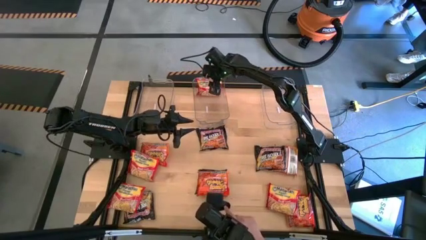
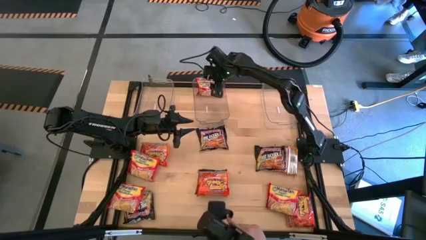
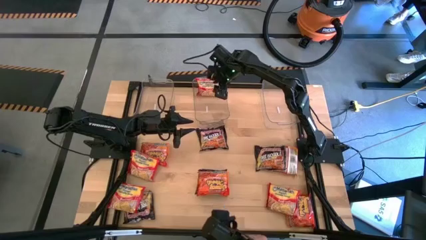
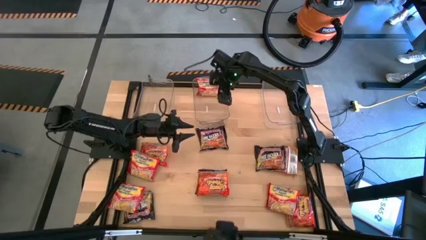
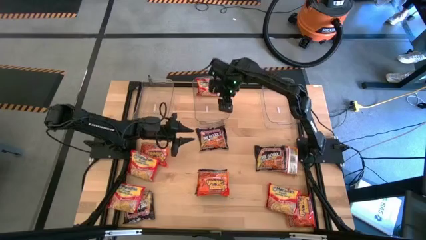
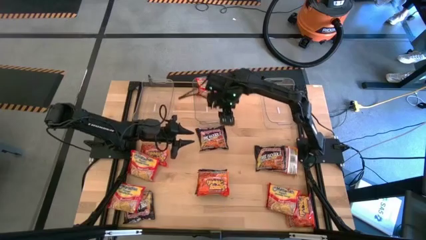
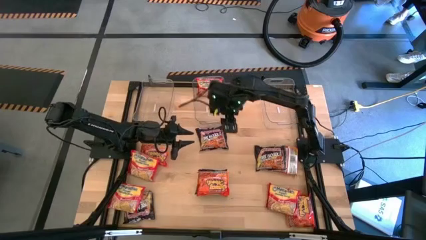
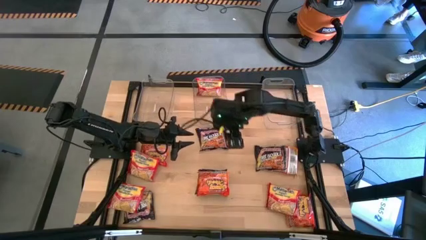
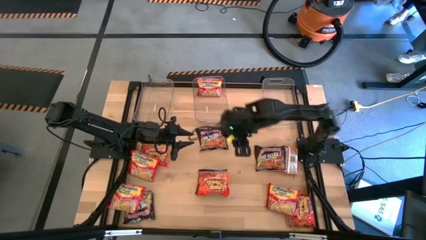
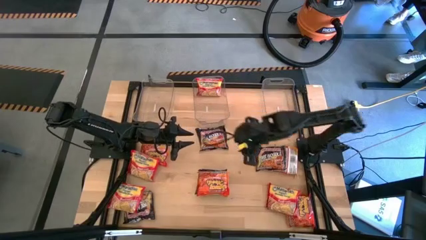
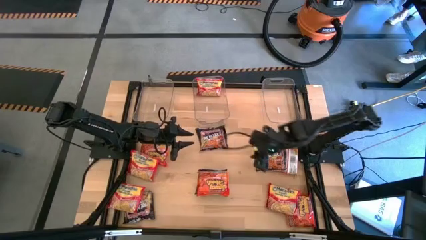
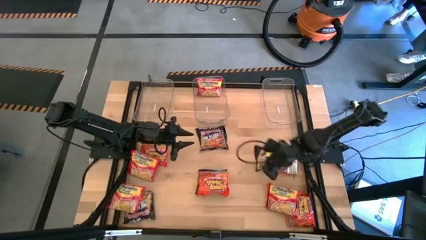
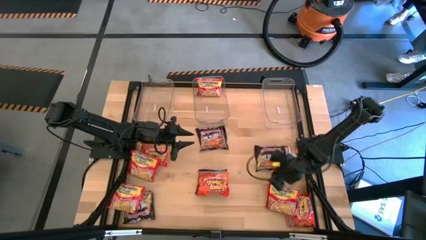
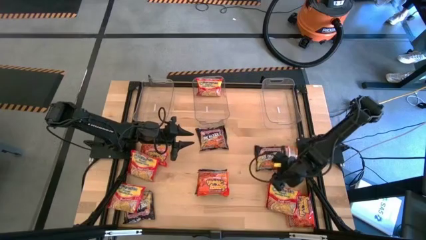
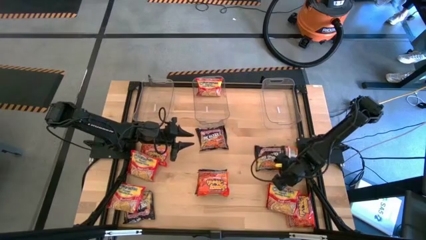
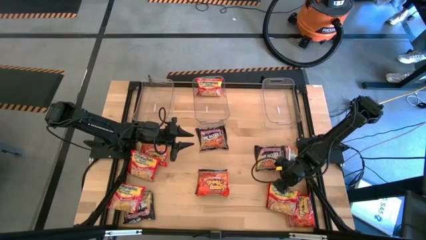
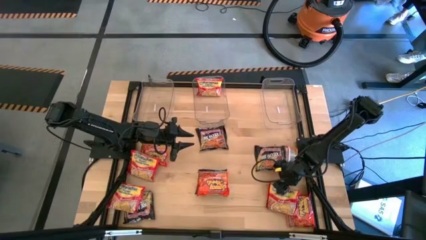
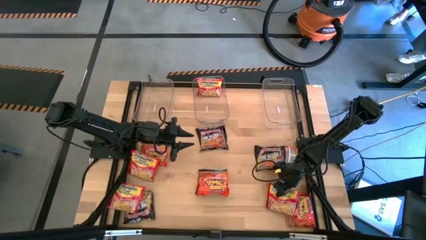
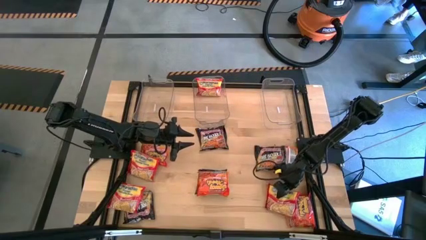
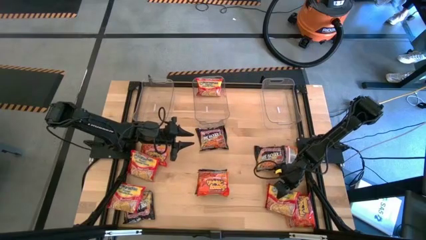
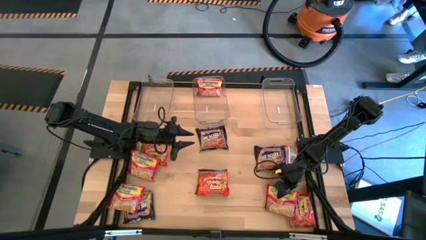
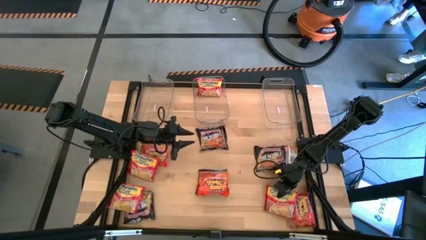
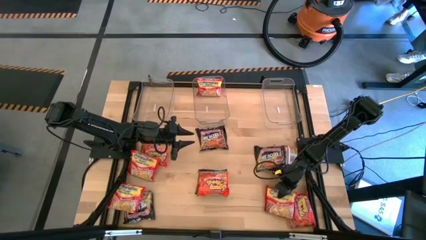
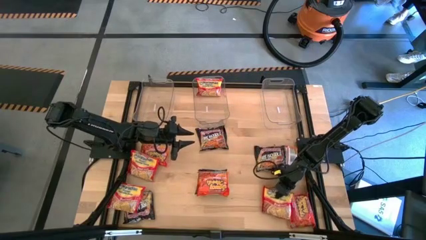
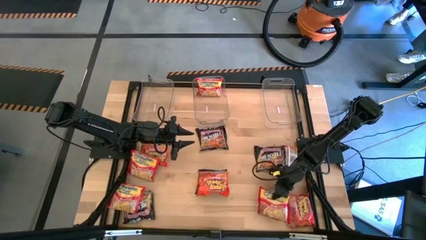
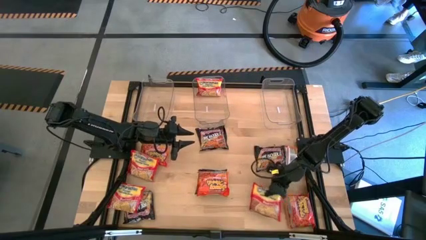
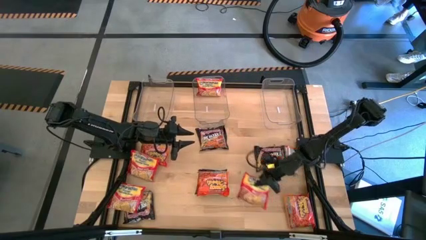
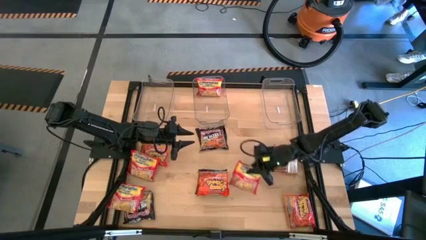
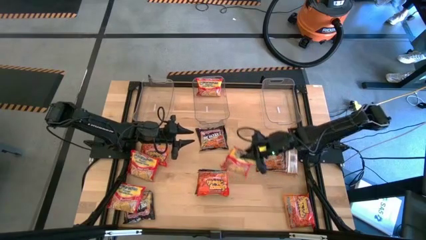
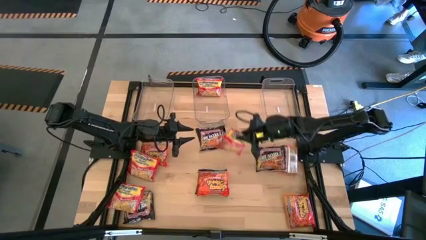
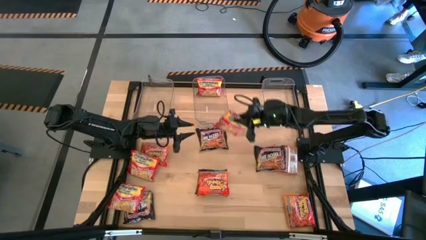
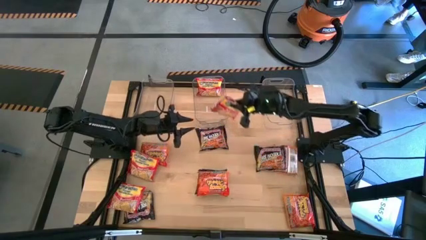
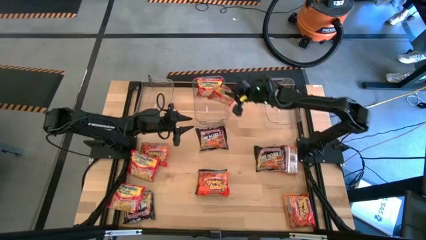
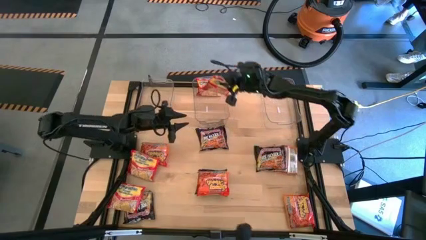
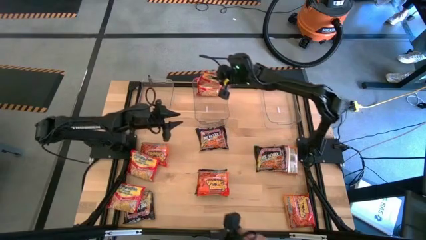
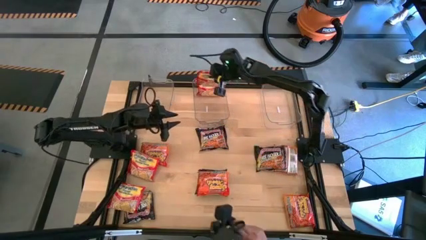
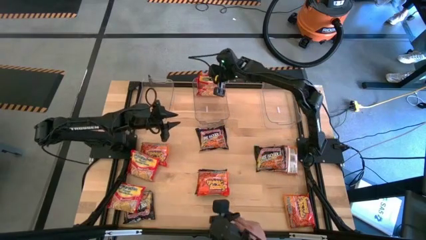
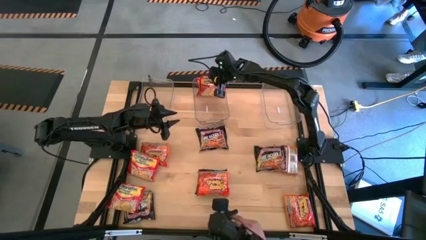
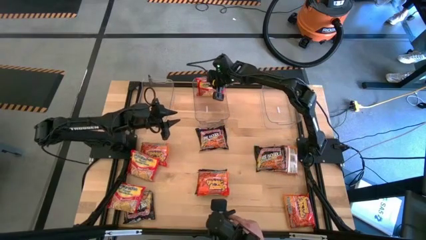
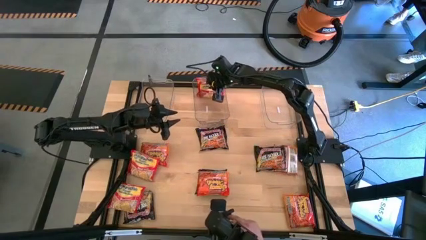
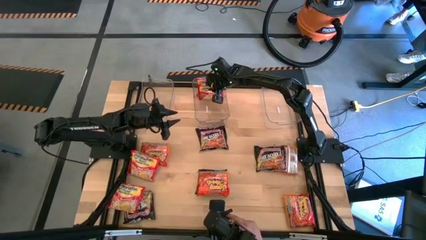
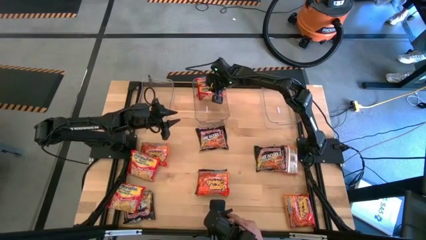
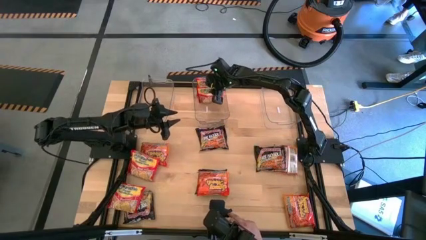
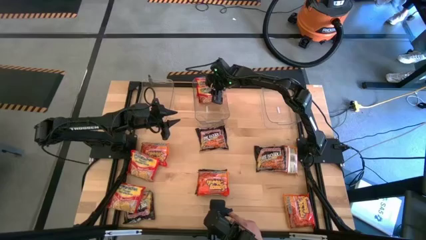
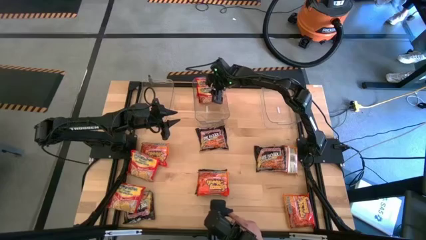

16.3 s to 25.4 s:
Task: Sort Maruchan noodles
Put the bottom right red noodle pack into the middle transparent bin

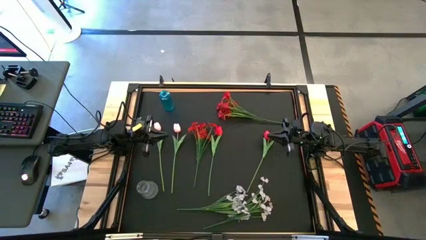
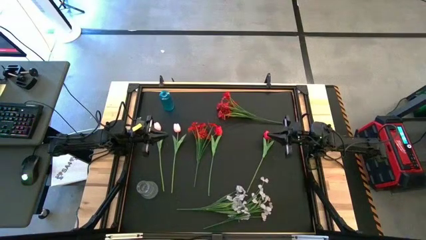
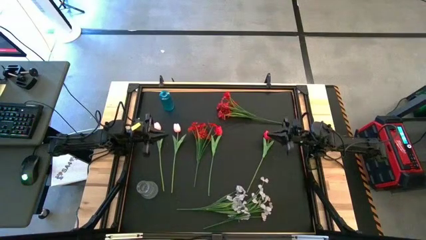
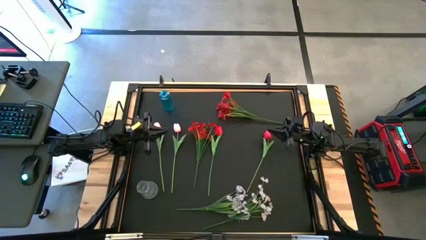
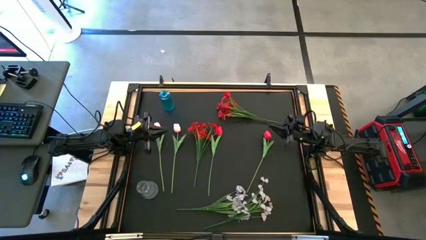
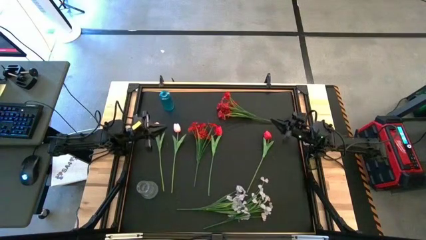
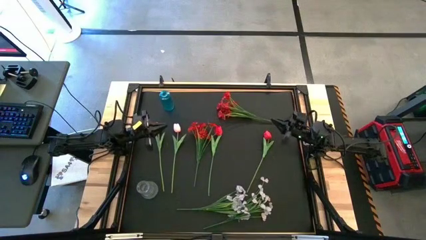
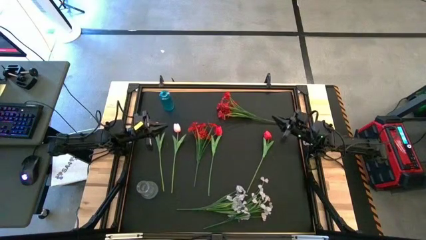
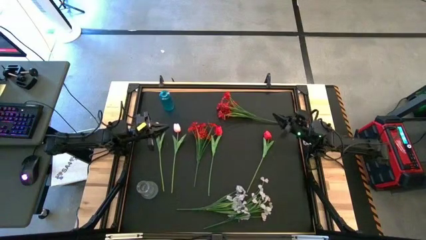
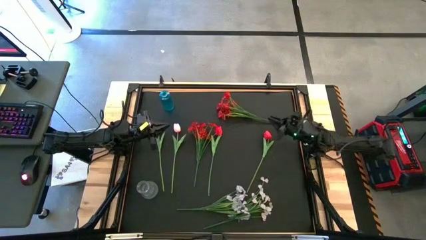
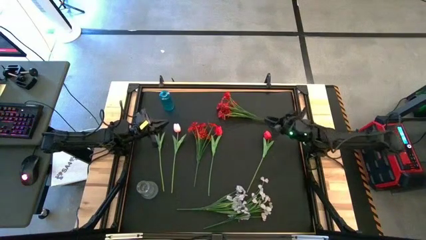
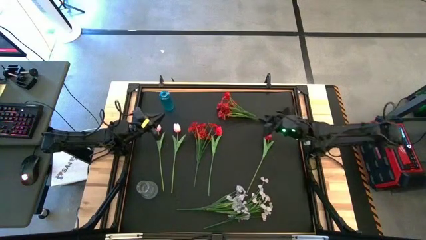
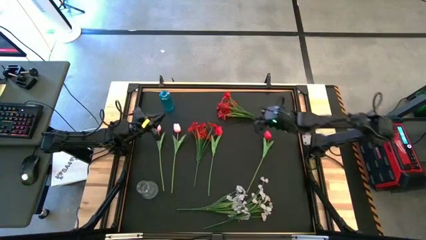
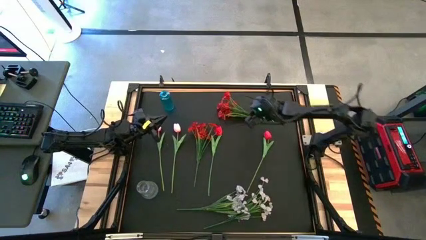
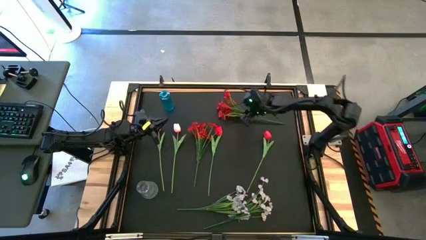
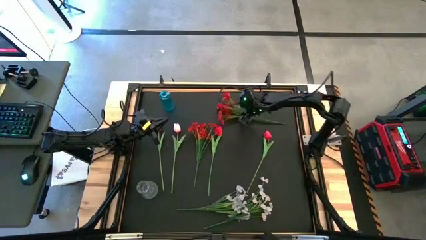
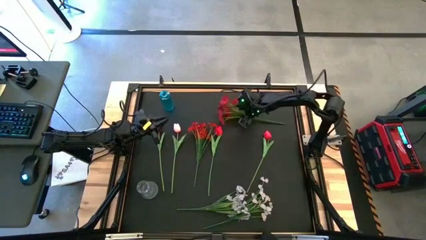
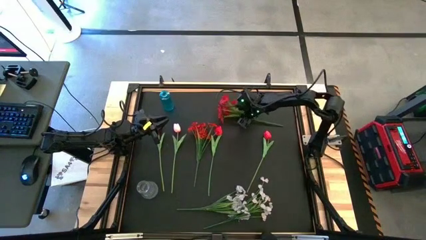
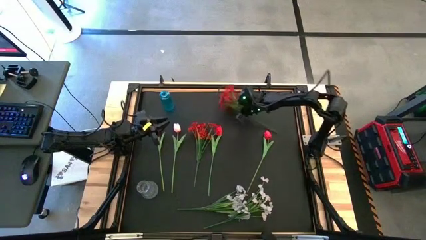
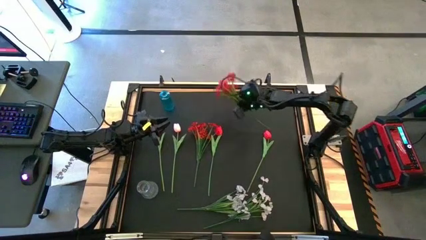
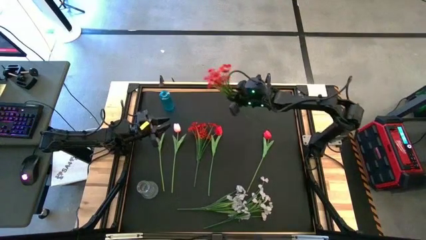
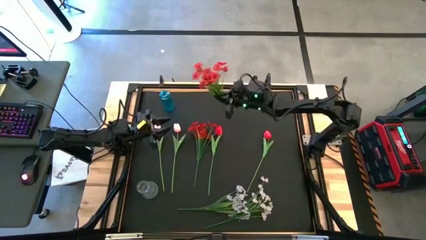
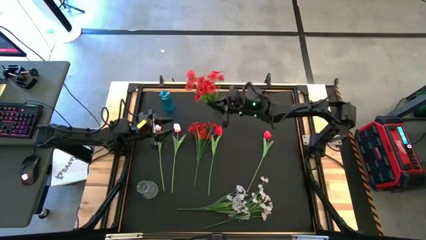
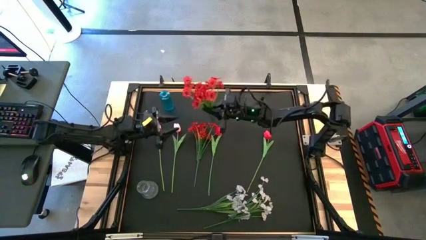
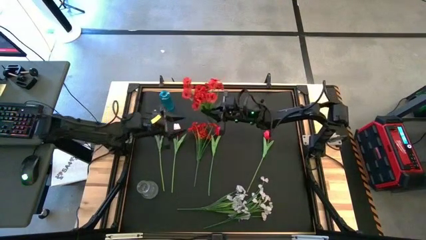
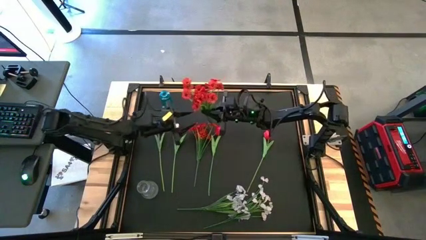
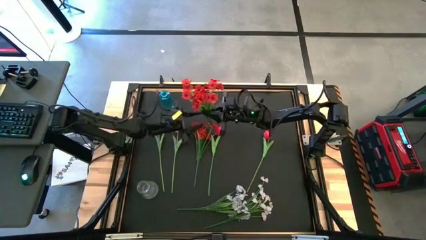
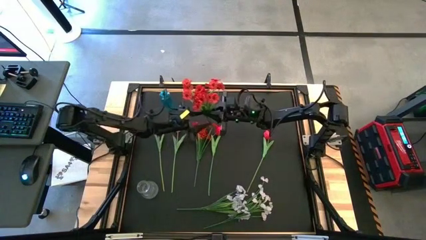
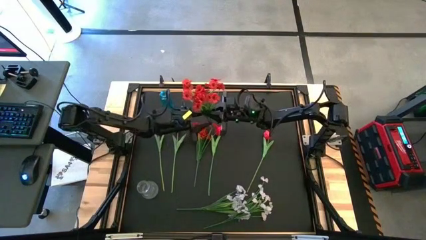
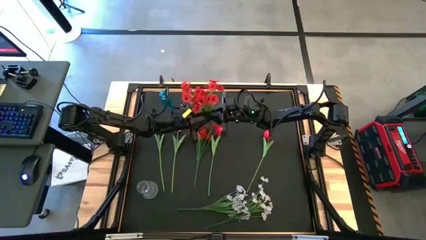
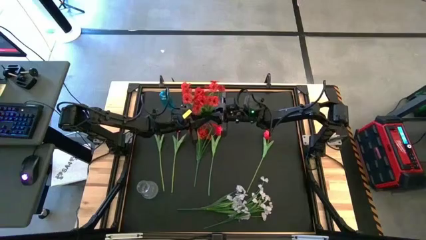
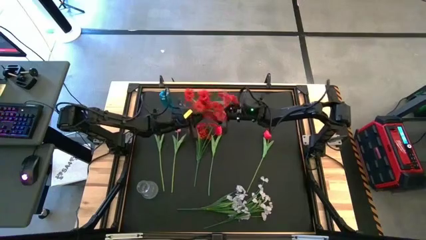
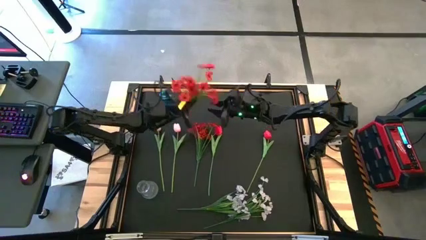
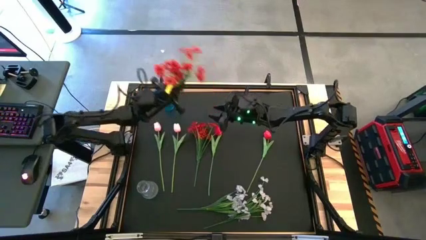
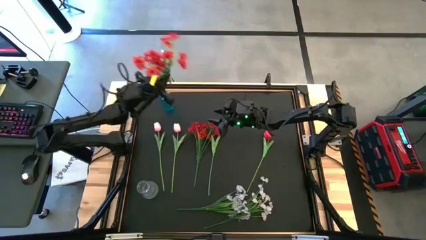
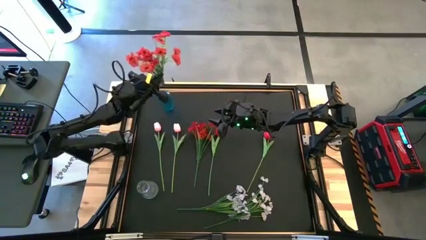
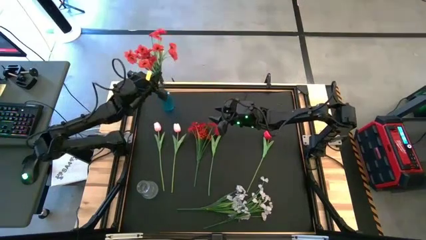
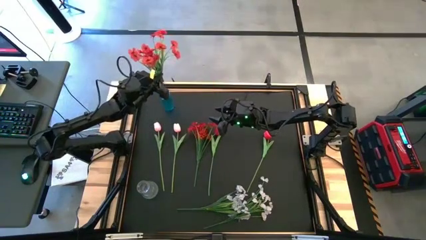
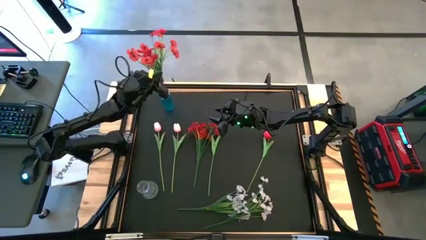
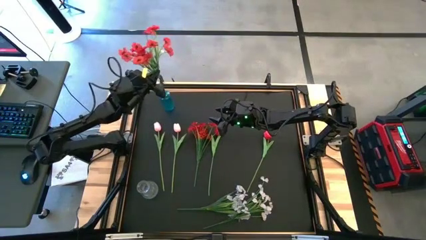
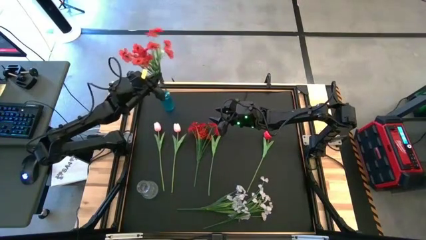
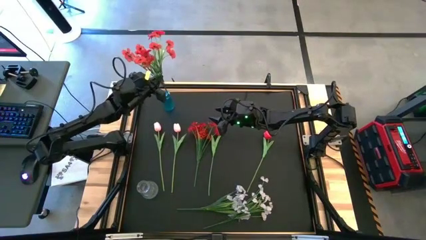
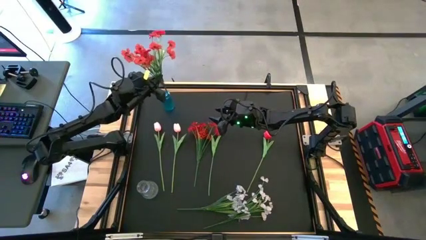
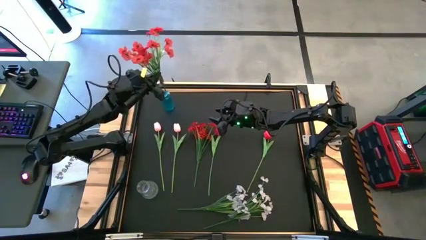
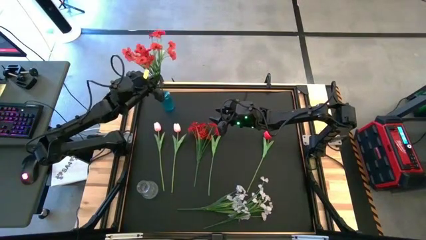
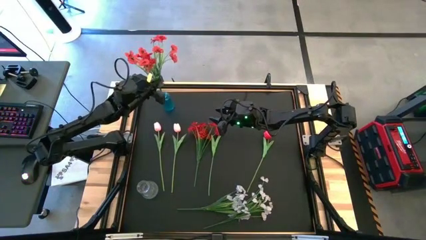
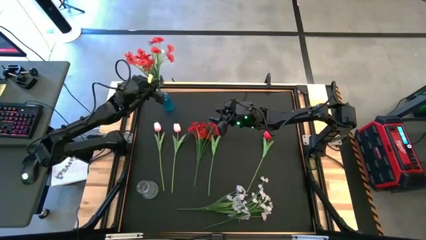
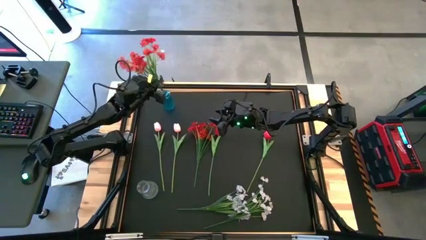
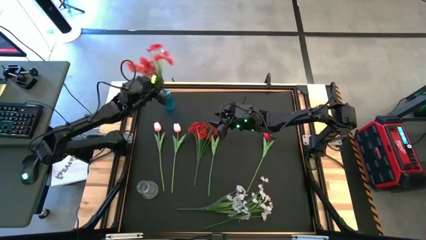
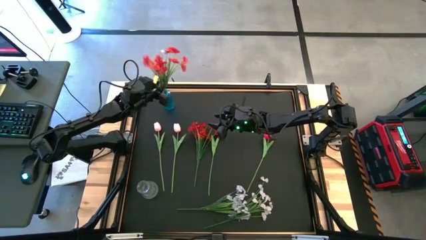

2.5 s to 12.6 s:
Task: Sort flowers into vase by color
Put the top red flowers into the blue vase
